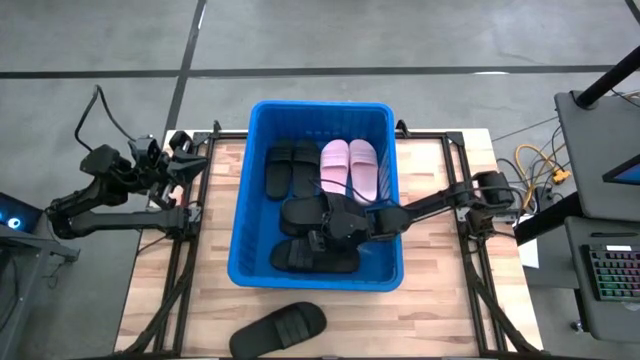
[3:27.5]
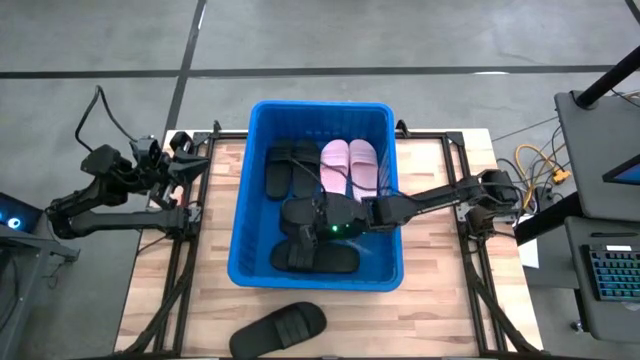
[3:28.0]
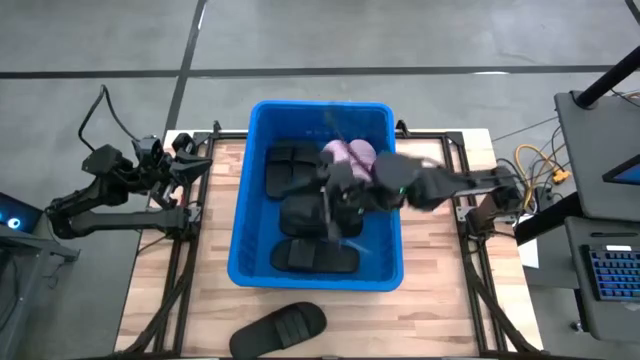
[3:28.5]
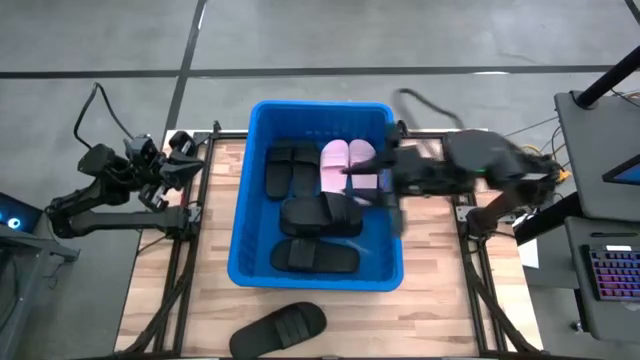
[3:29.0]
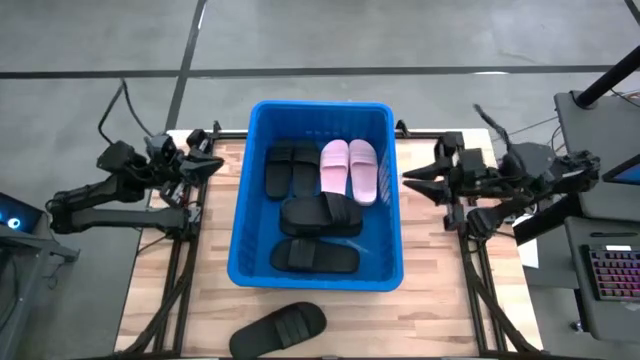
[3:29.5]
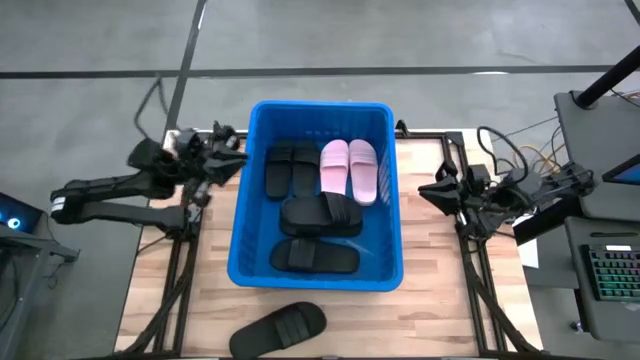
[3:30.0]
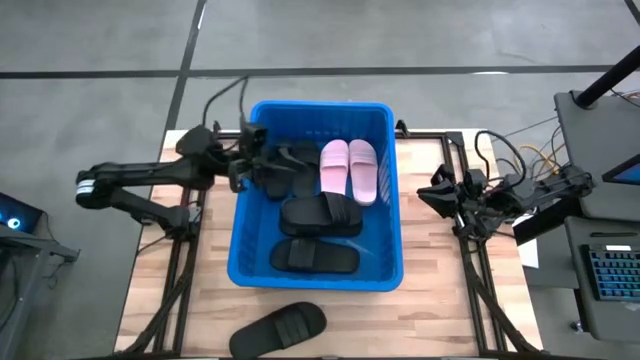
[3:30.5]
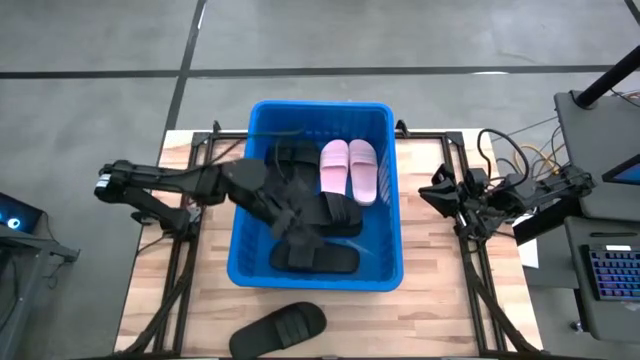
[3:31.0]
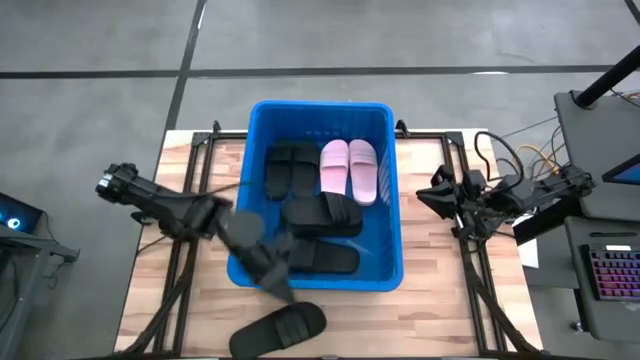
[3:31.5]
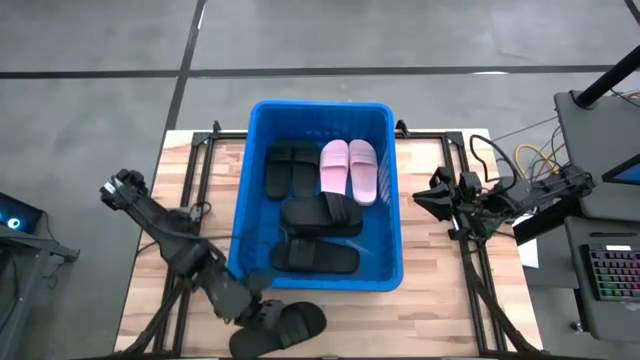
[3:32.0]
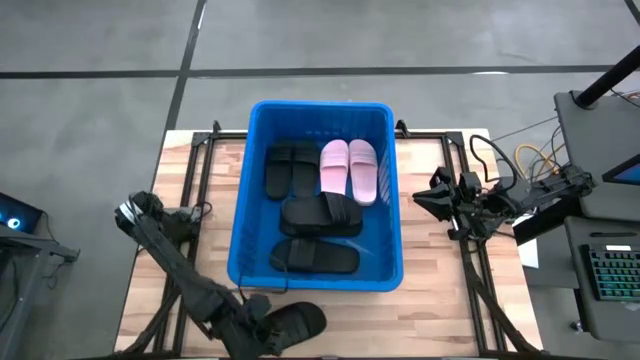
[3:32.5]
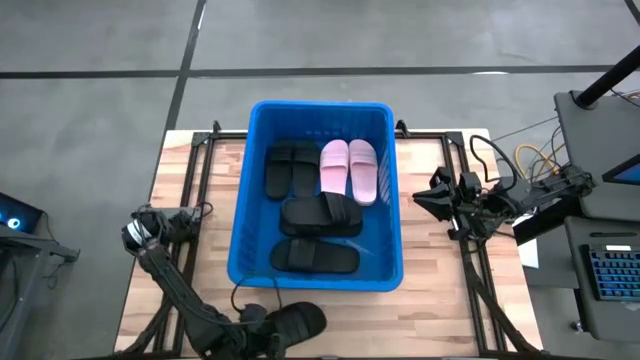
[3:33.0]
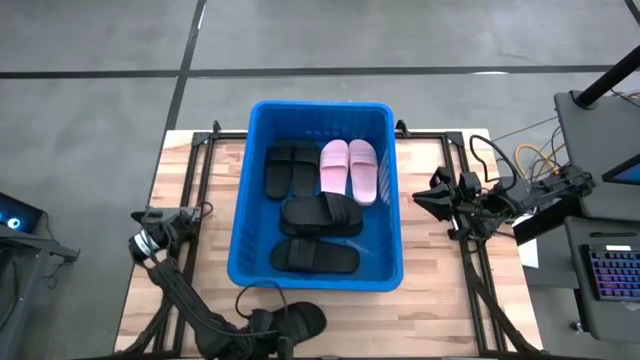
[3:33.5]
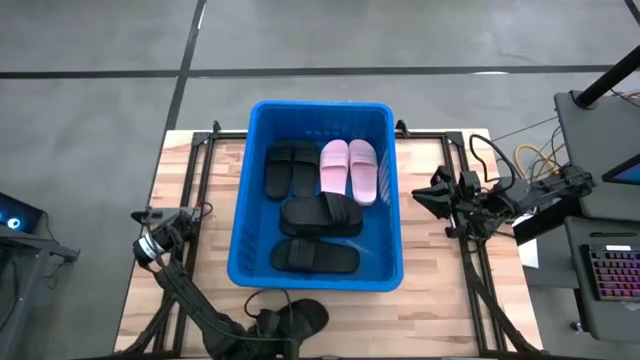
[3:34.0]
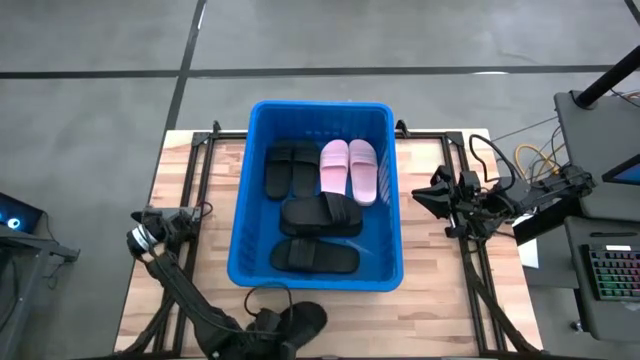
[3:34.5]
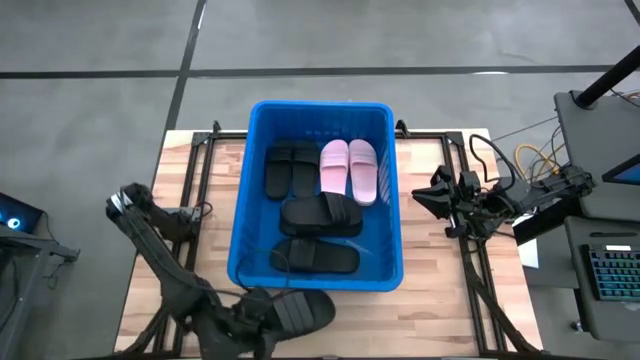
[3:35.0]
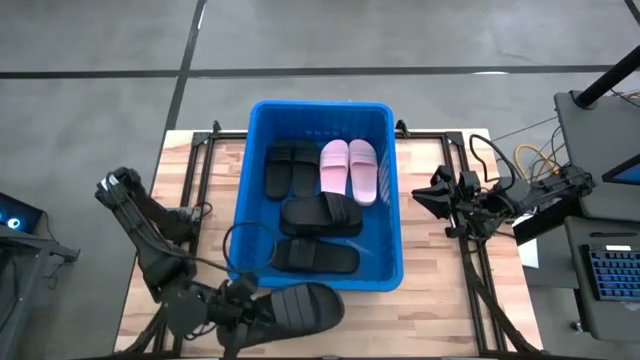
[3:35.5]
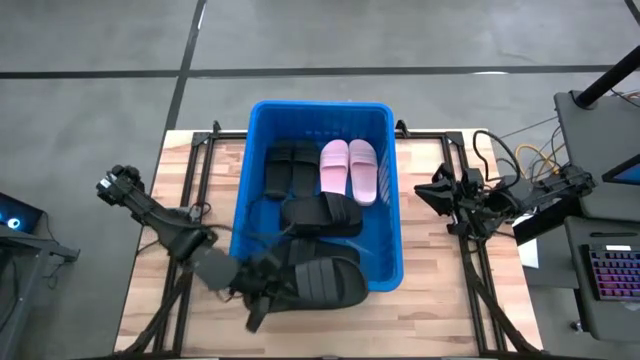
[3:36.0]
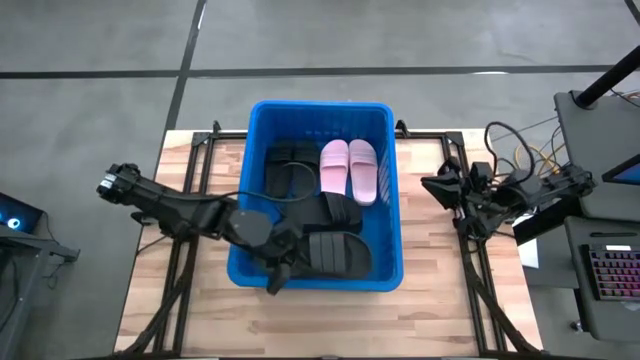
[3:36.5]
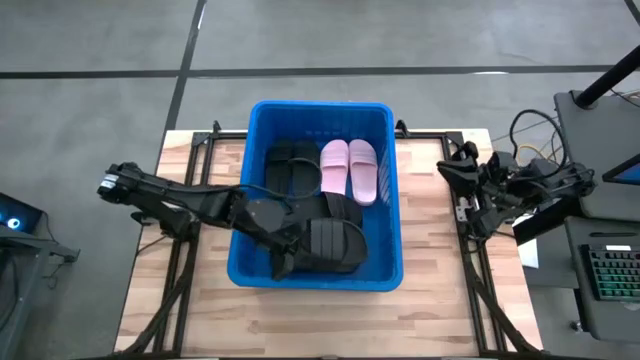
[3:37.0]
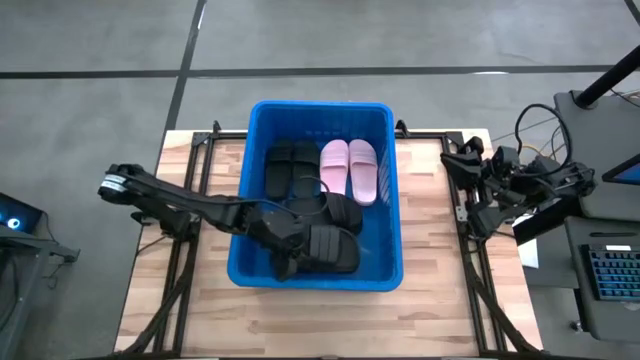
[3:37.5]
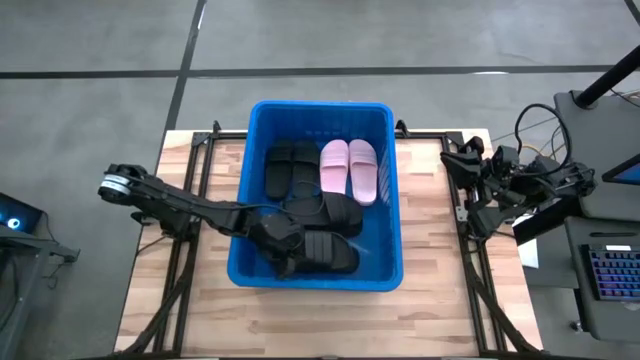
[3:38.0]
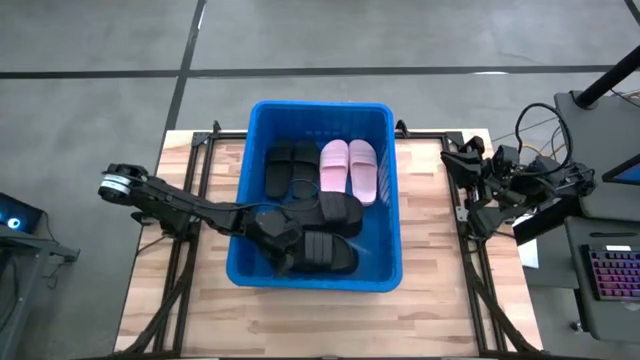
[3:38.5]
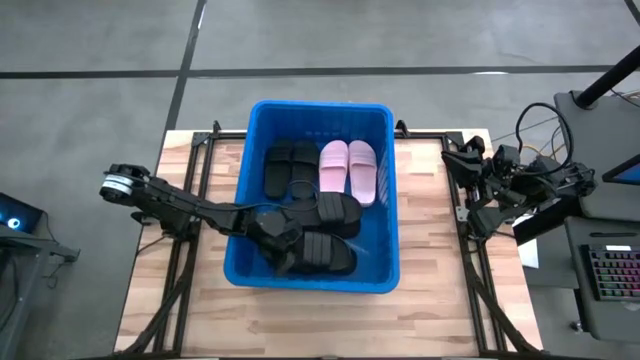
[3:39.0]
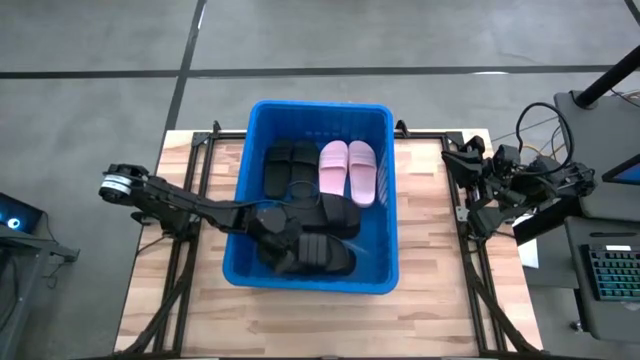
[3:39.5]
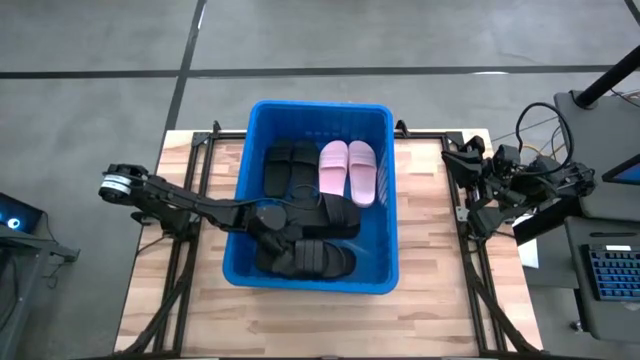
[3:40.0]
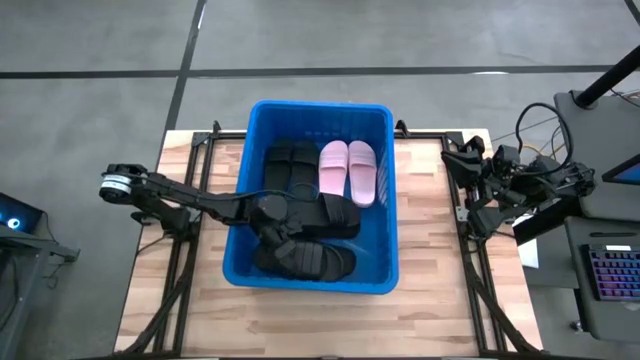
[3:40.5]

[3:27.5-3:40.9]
Task: Pick and place slides into bin
Put the black slide into the blue bin

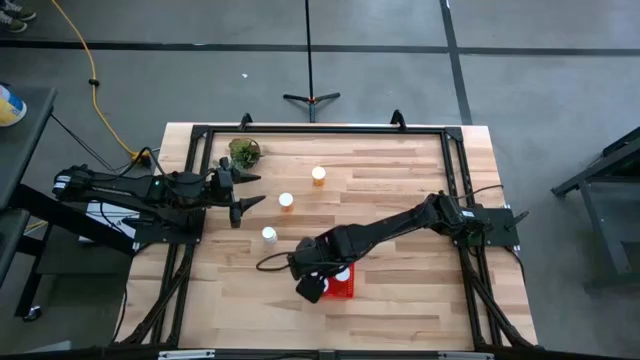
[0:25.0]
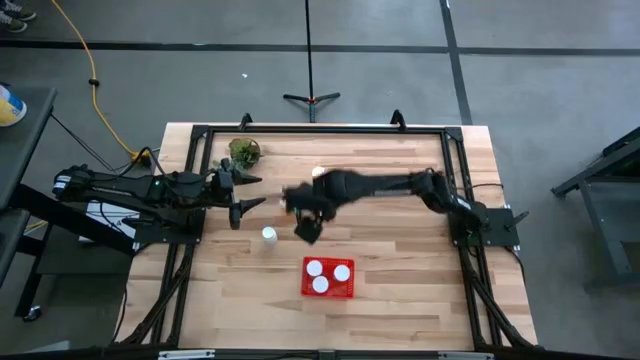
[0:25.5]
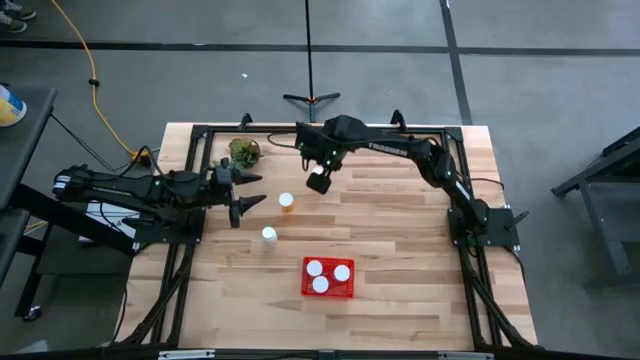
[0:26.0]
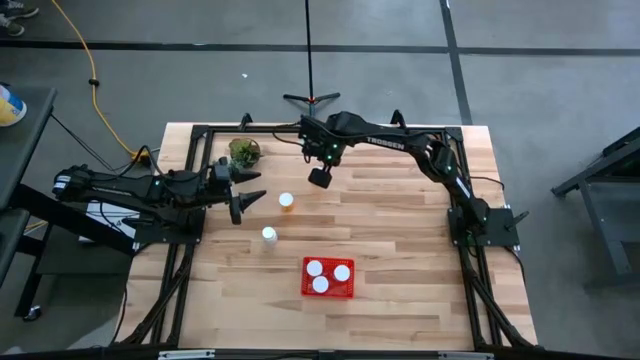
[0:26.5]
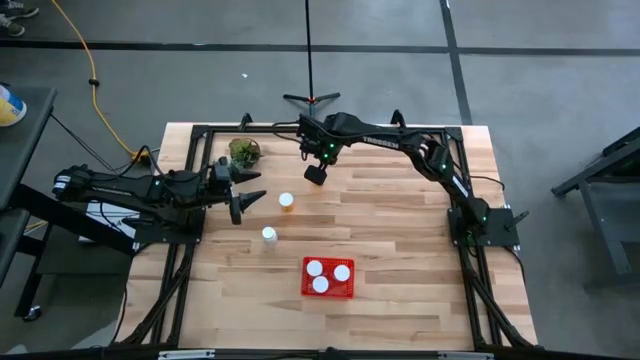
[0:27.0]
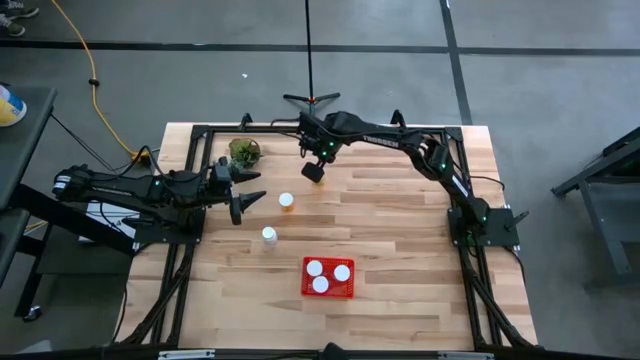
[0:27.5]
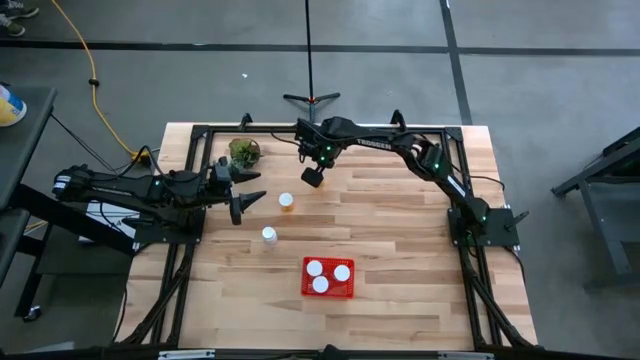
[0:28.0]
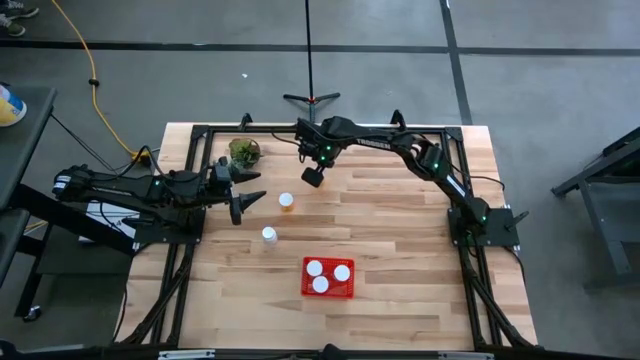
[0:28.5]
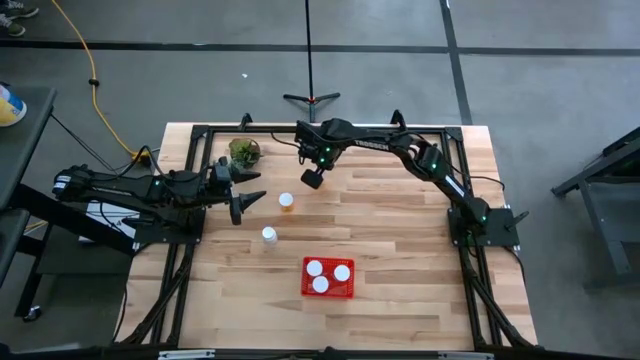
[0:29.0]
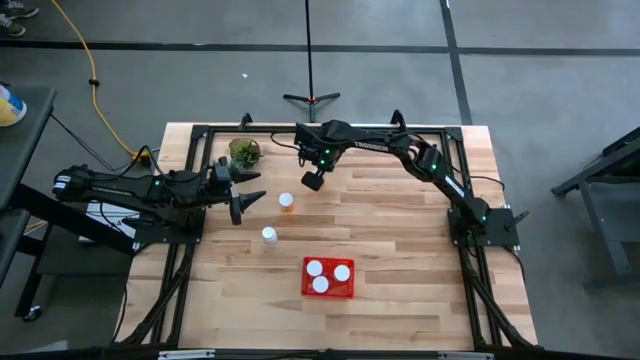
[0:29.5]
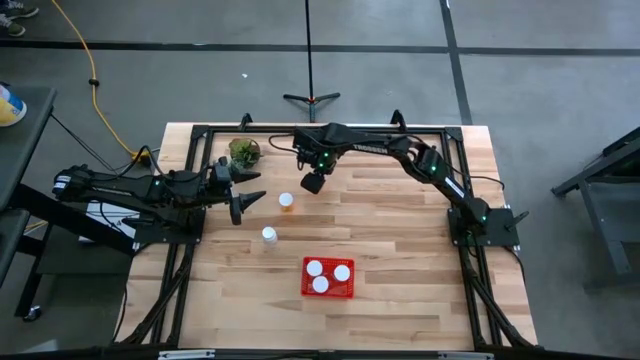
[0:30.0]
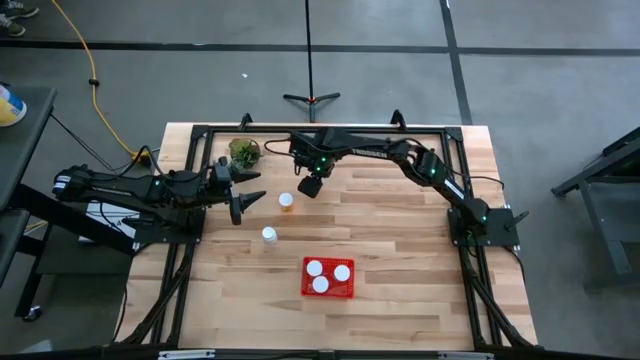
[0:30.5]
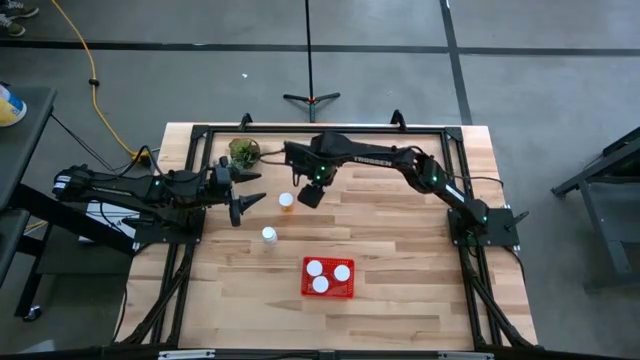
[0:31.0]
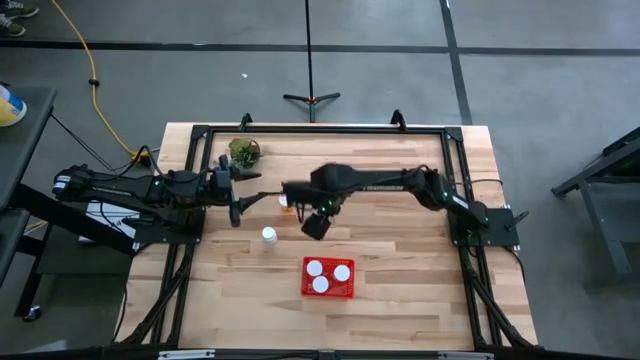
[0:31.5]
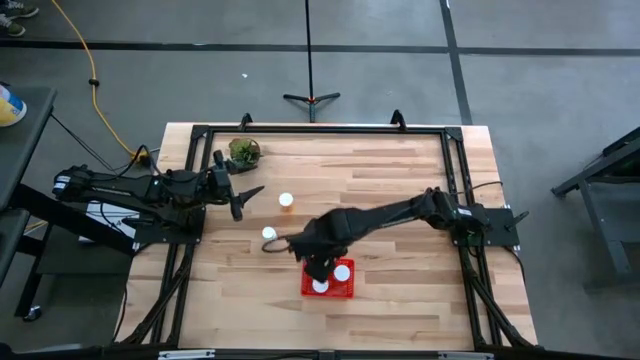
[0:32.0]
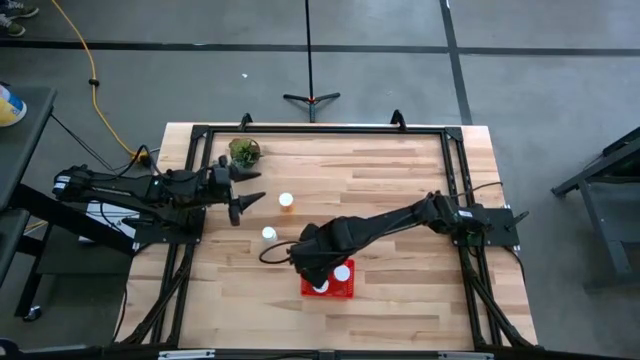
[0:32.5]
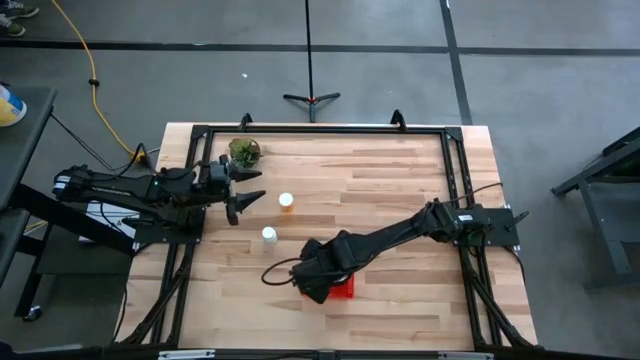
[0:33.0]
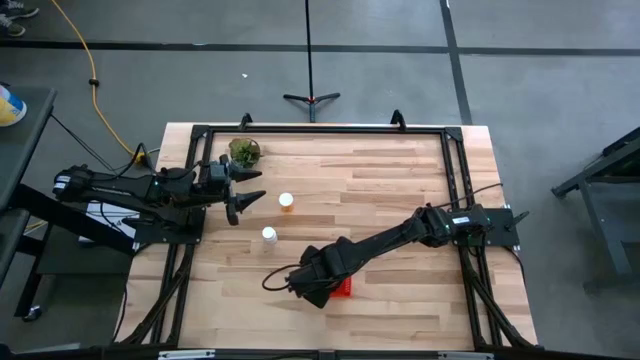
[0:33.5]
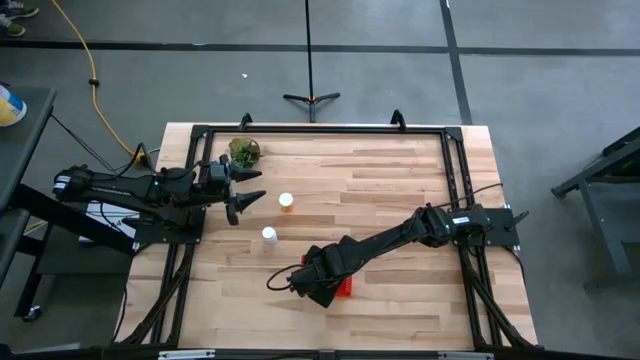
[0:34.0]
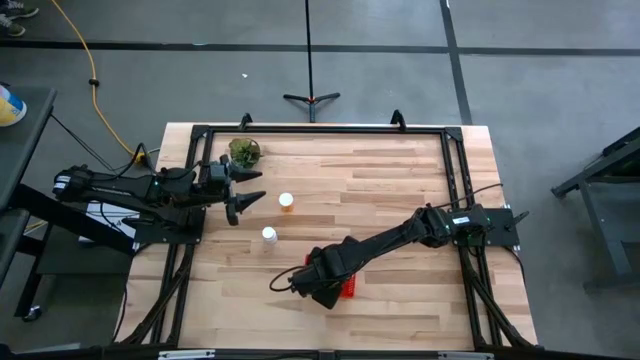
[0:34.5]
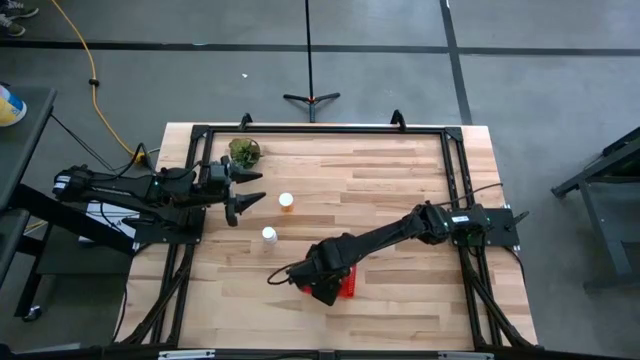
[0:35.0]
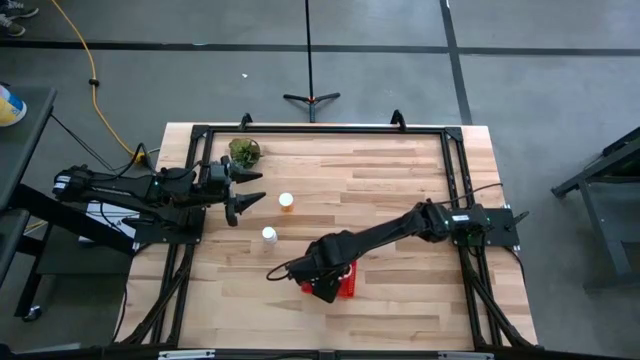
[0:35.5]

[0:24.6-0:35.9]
Task: Pick and place pill bottles into a basket
Put the orange pill bottle into the red bin
